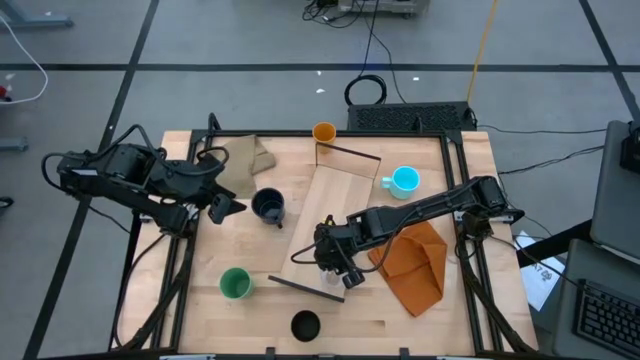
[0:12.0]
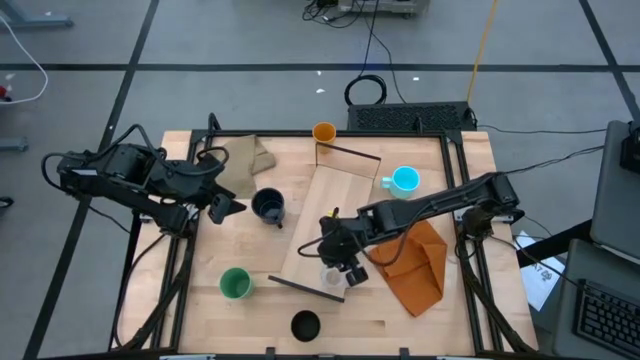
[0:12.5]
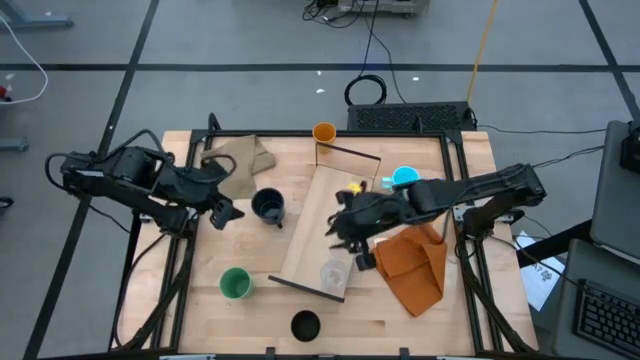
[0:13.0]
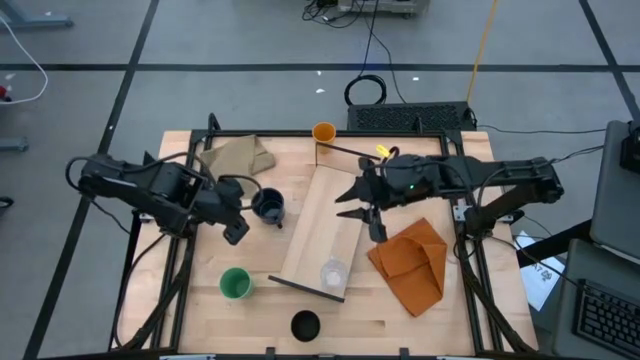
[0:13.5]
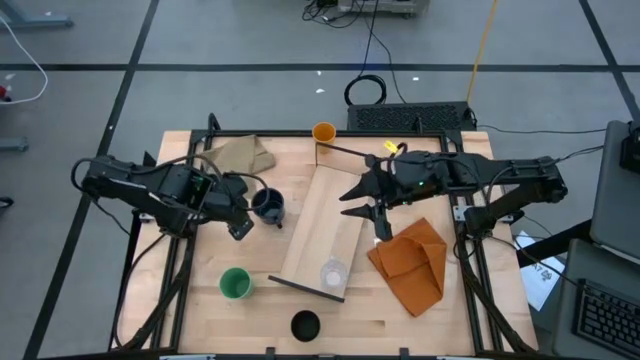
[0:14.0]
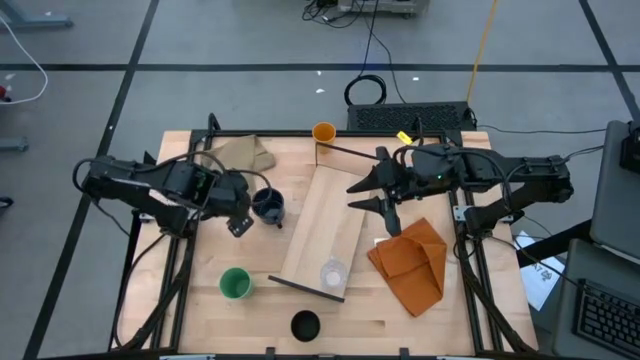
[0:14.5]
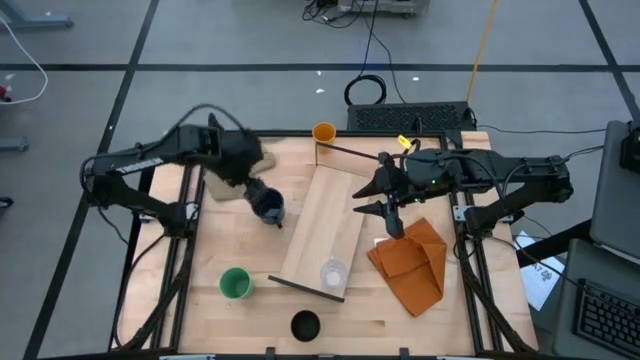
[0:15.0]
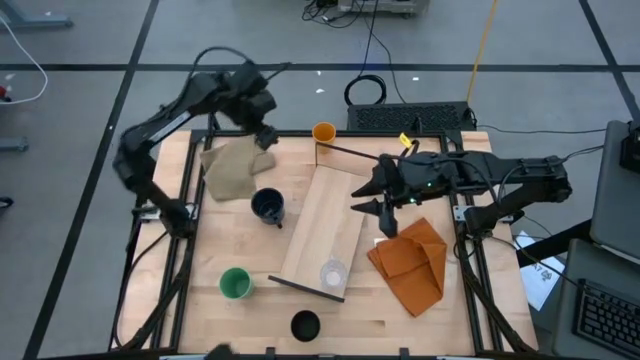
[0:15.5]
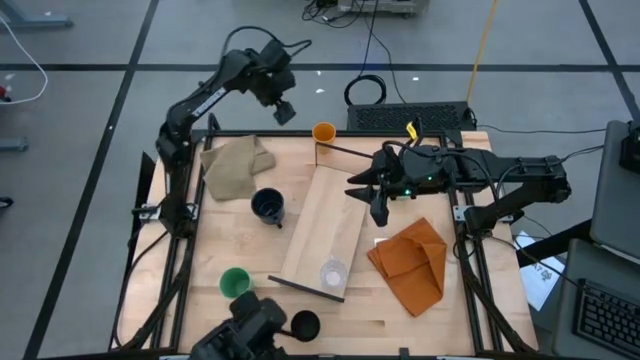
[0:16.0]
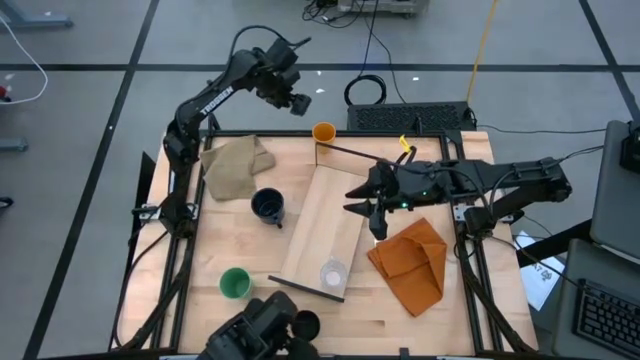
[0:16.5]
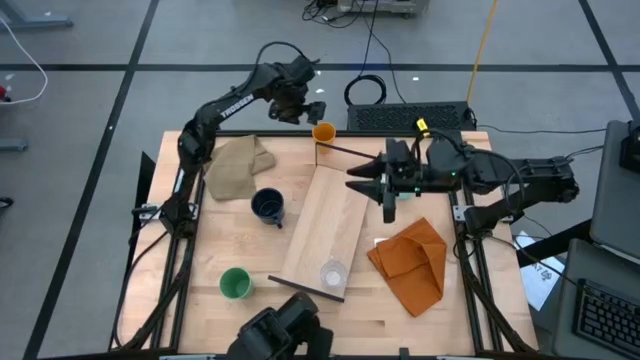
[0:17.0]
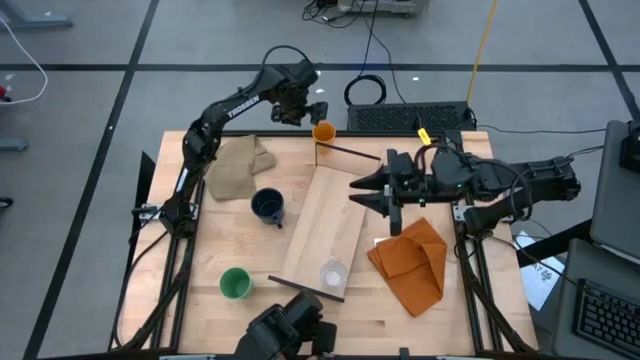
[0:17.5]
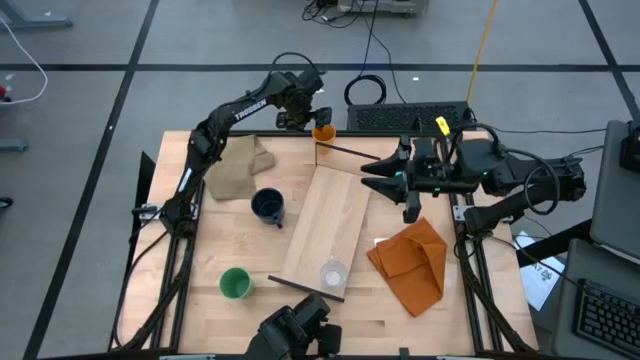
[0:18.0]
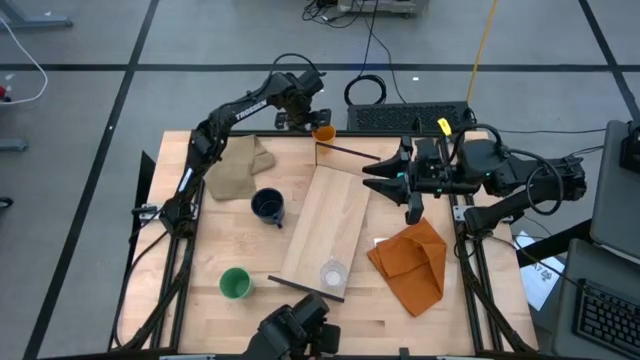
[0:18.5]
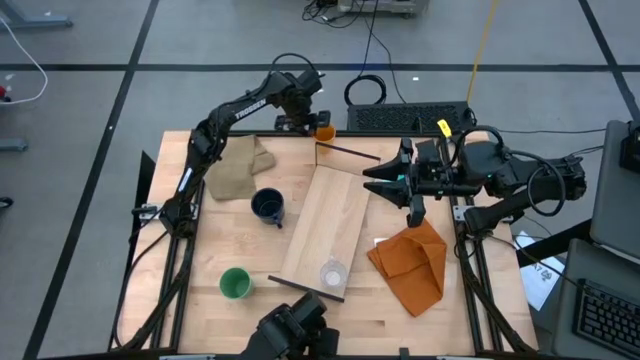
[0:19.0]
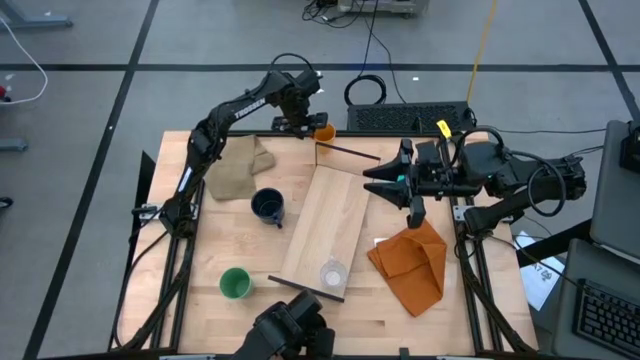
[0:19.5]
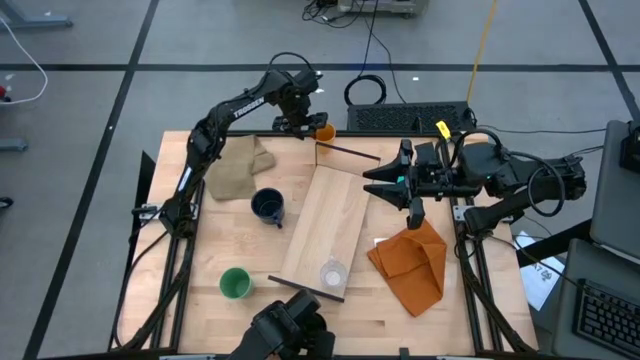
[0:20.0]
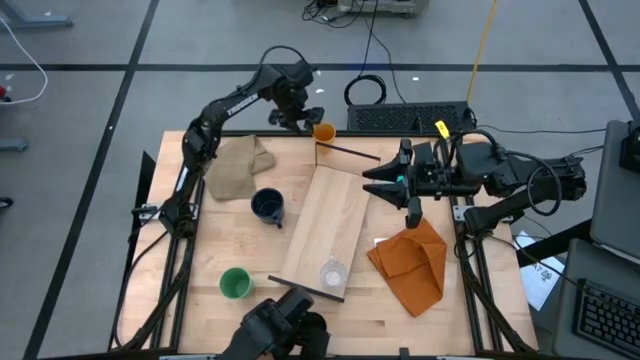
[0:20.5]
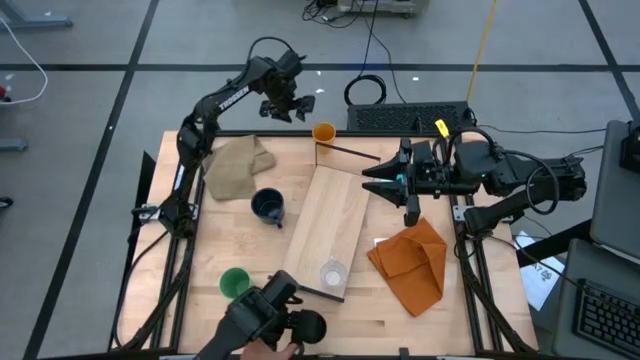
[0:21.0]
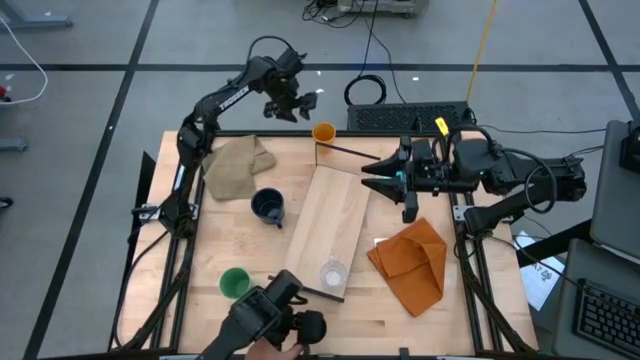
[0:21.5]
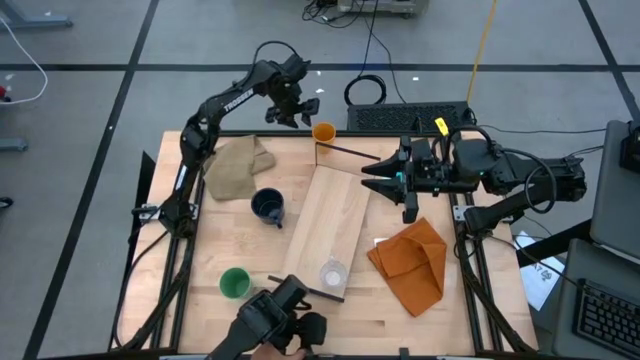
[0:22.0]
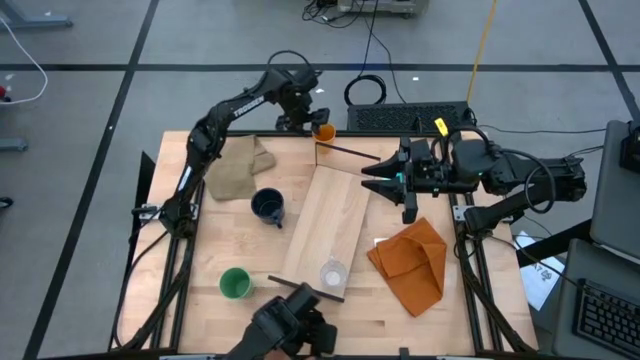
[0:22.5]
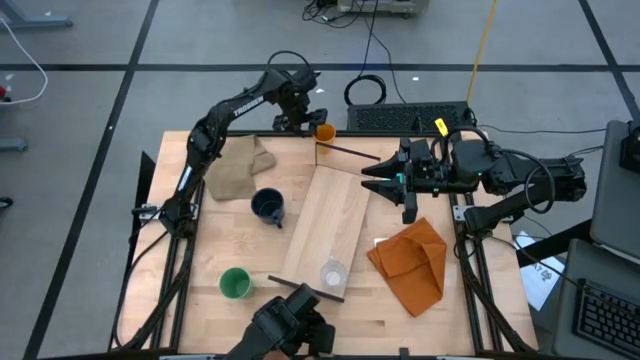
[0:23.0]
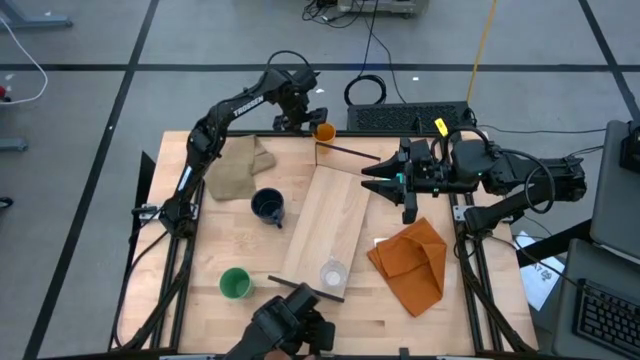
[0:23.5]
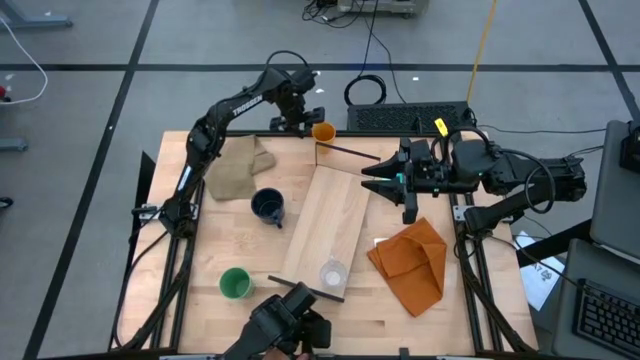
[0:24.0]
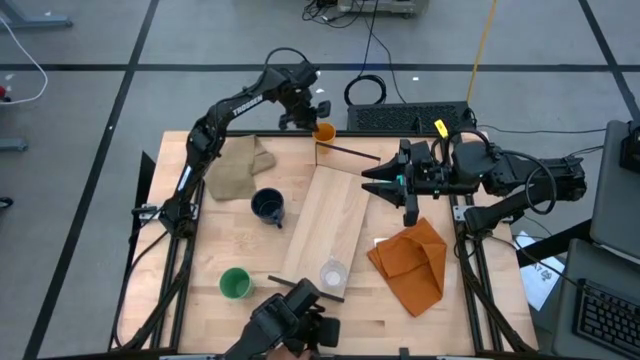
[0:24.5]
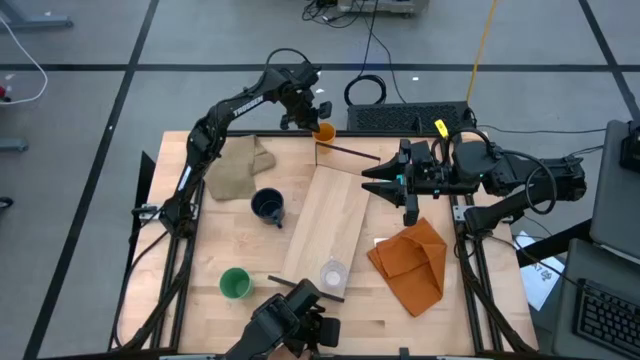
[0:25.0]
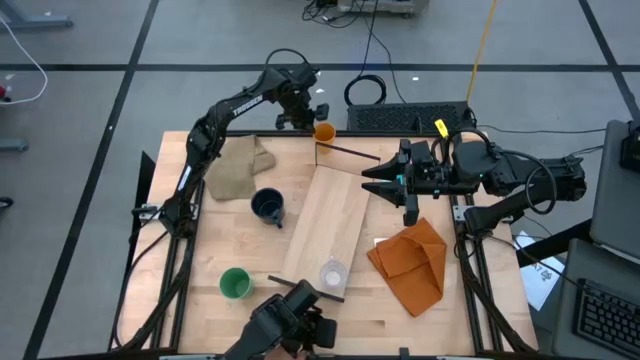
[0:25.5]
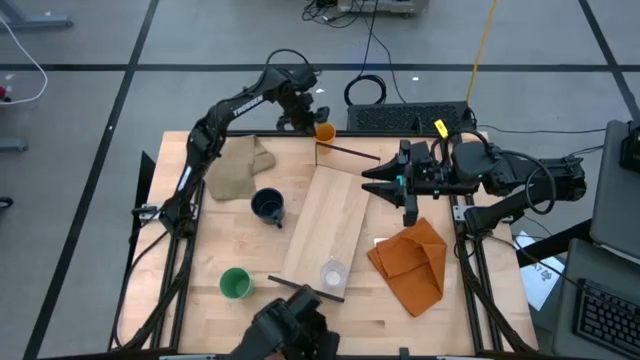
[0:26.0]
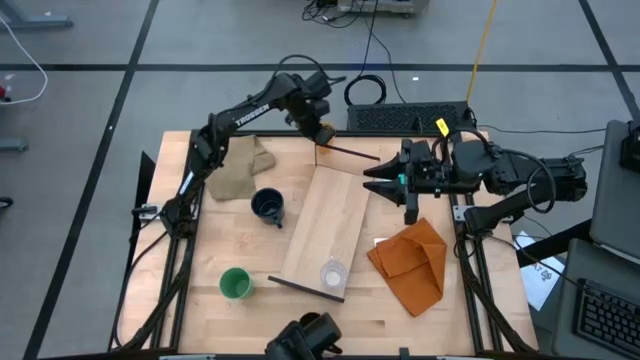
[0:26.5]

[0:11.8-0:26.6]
Task: Stack small to large cups/mugs on shelf
Put the orange cup on the shelf

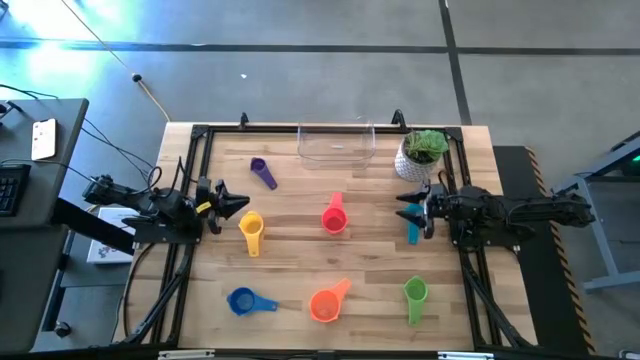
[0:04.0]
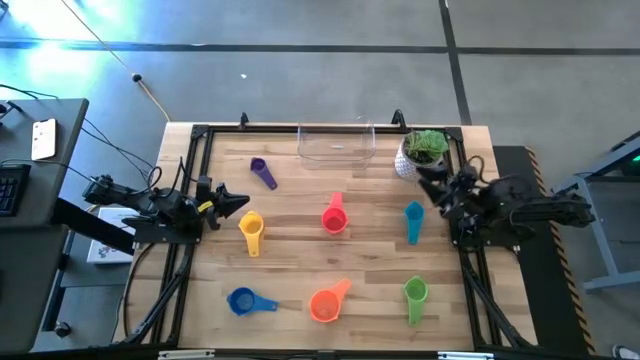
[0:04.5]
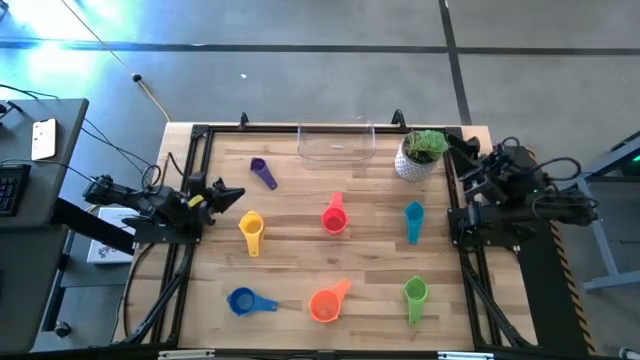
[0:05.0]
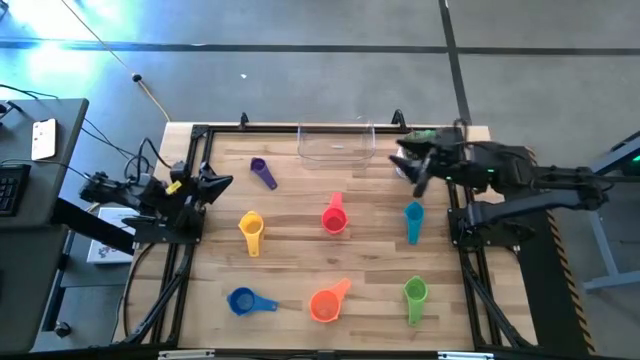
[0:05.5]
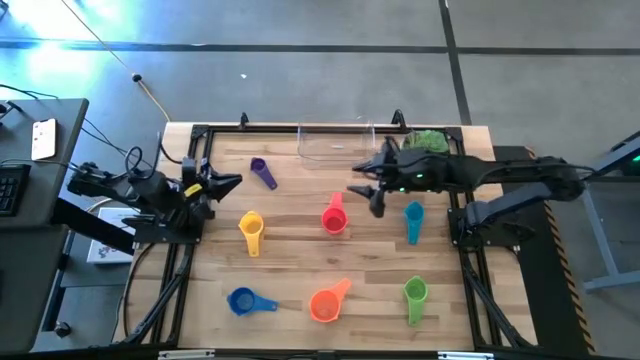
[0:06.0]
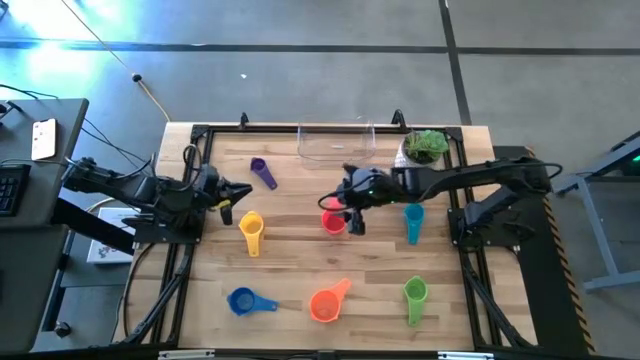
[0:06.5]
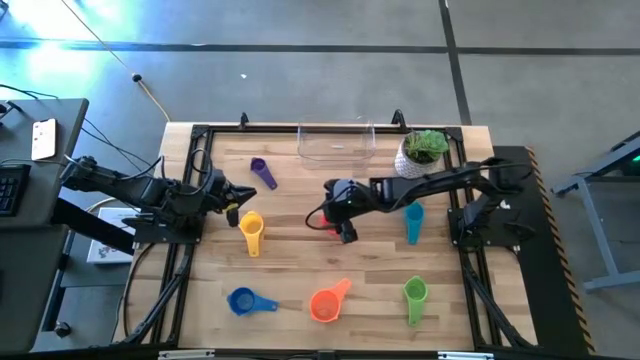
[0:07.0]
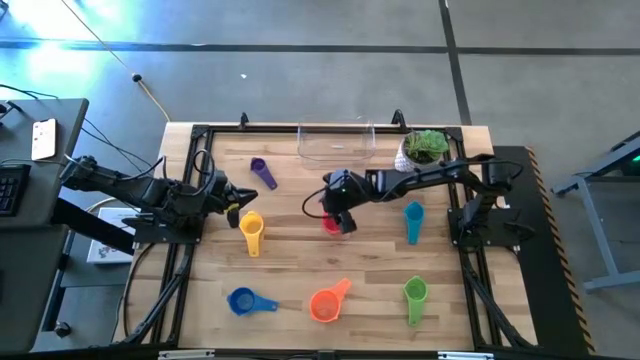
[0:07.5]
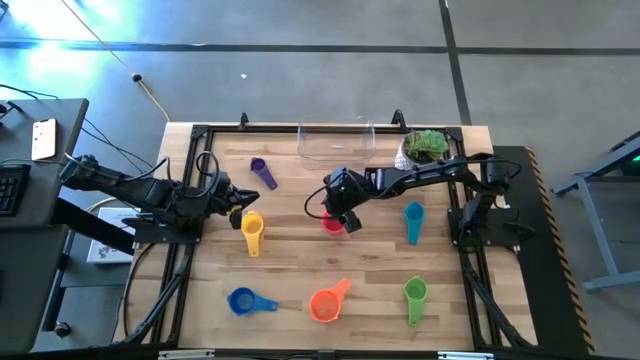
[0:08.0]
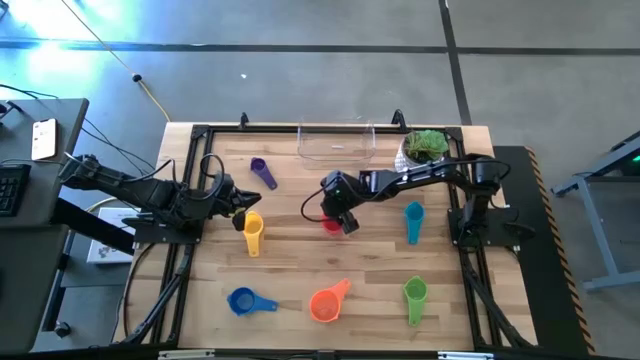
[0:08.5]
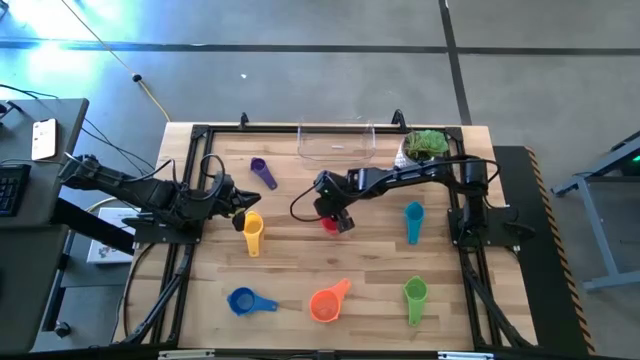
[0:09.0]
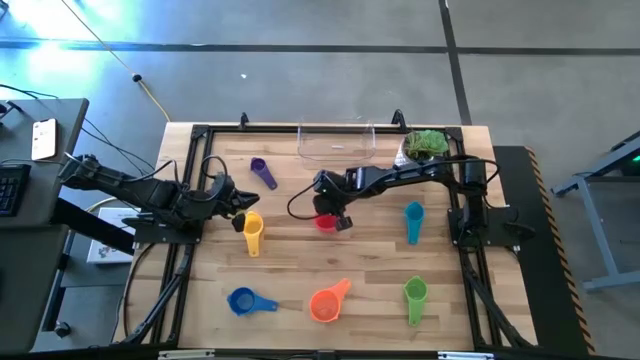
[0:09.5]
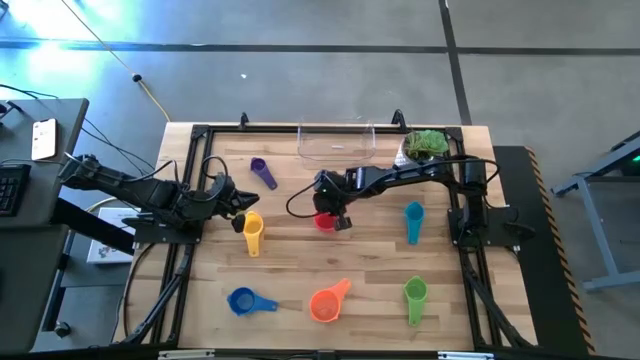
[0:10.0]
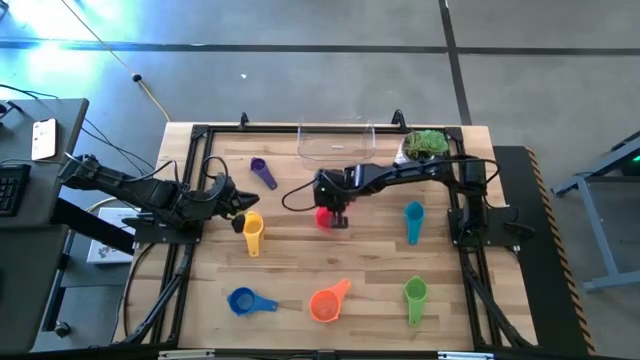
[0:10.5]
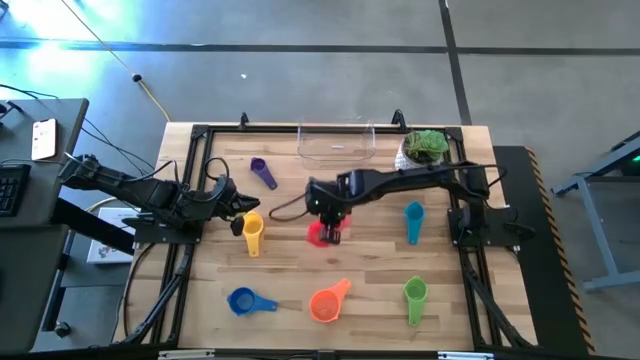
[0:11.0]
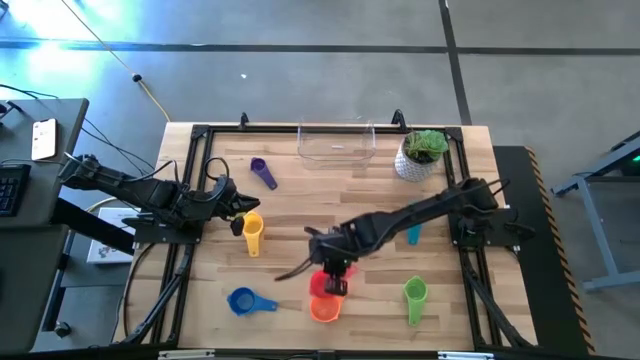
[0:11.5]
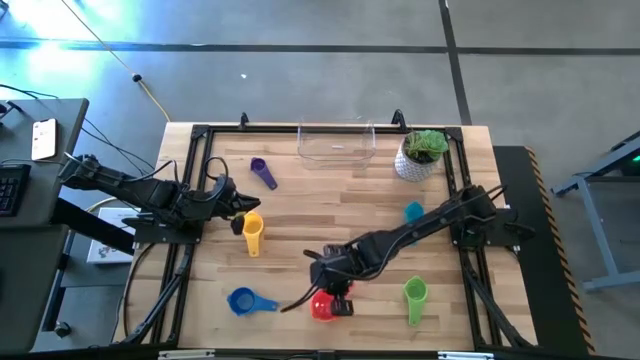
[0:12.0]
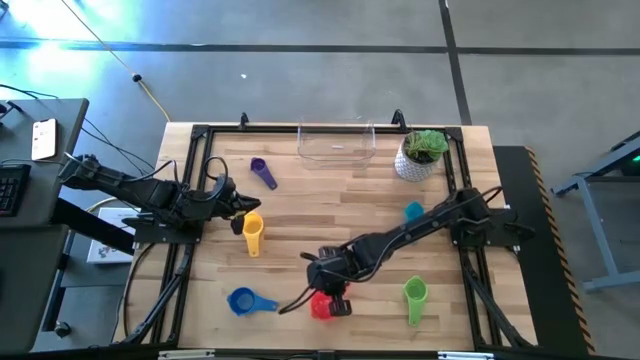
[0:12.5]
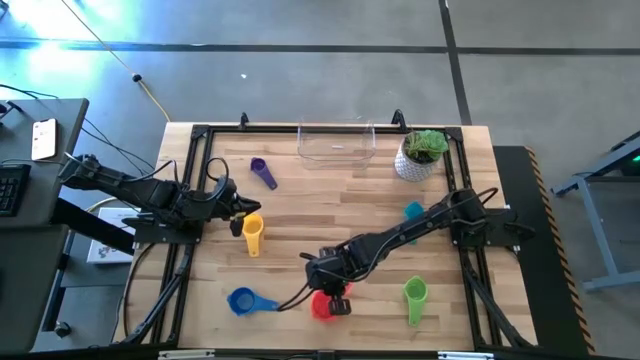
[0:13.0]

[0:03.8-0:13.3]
Task: Nest measuring cups in basket
Stack the pink measuring cup on top of the orange measuring cup
